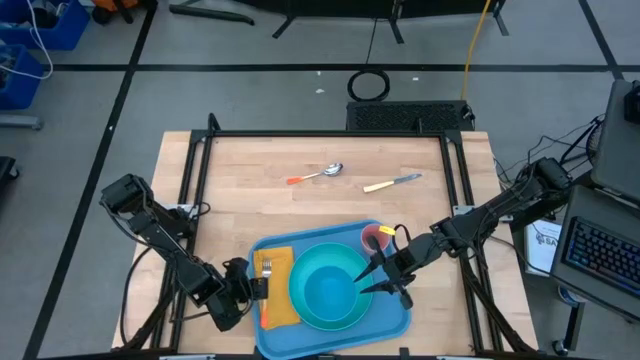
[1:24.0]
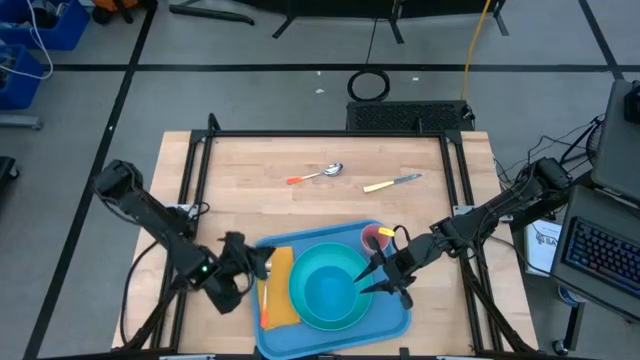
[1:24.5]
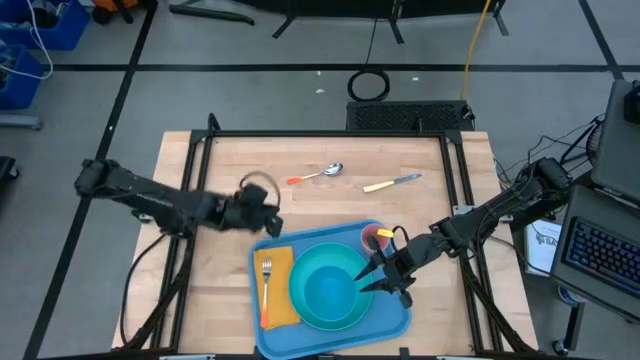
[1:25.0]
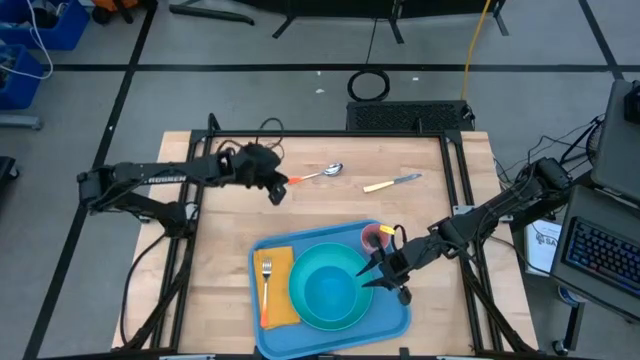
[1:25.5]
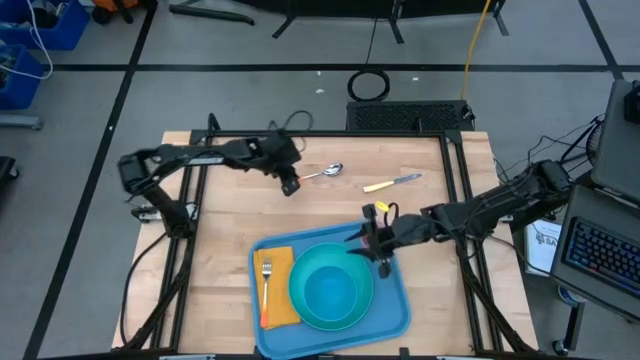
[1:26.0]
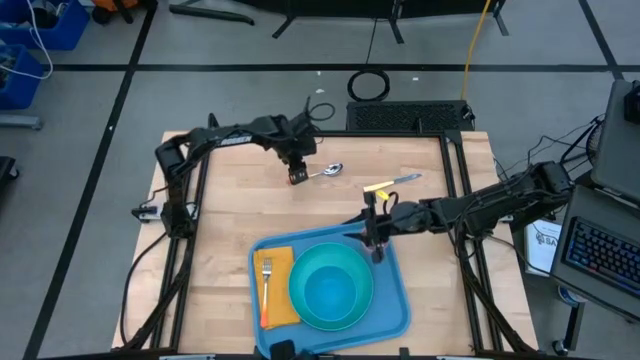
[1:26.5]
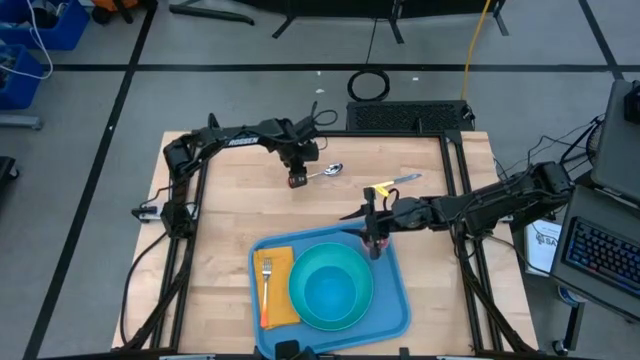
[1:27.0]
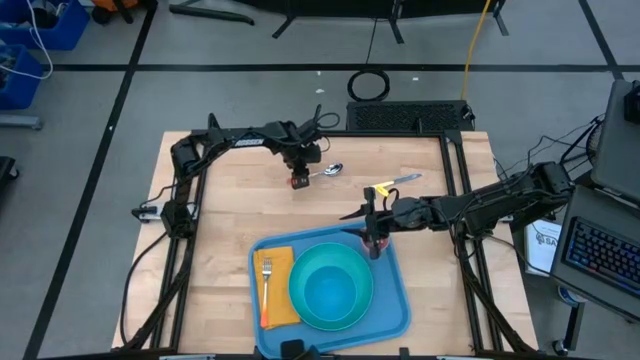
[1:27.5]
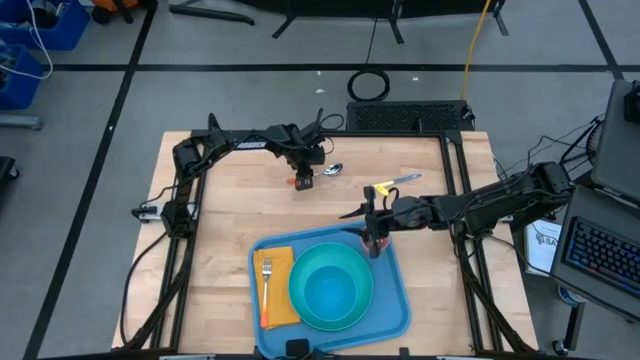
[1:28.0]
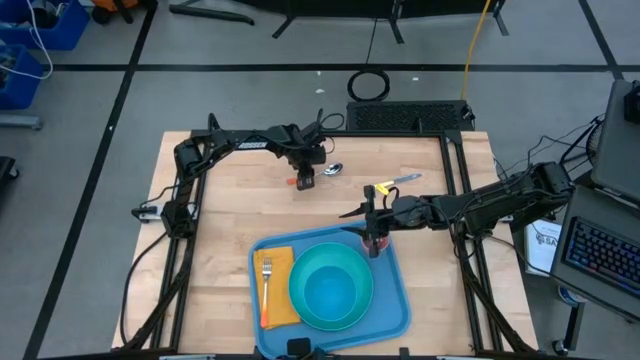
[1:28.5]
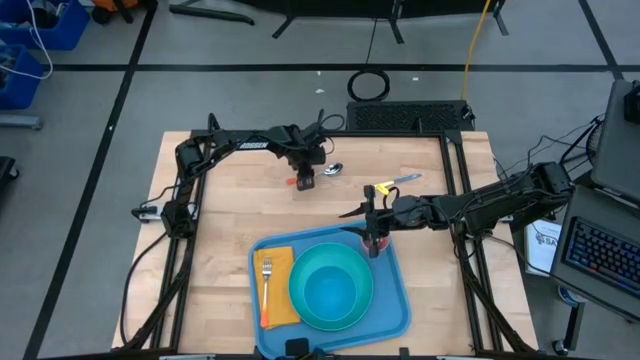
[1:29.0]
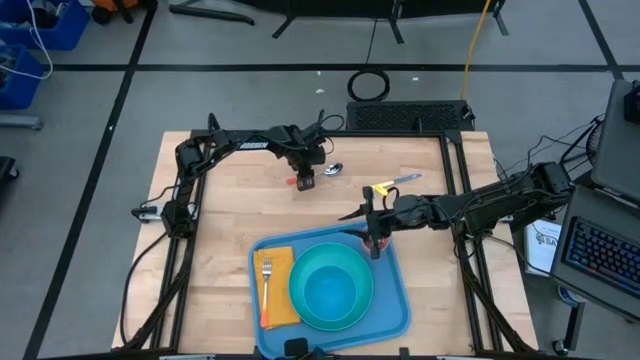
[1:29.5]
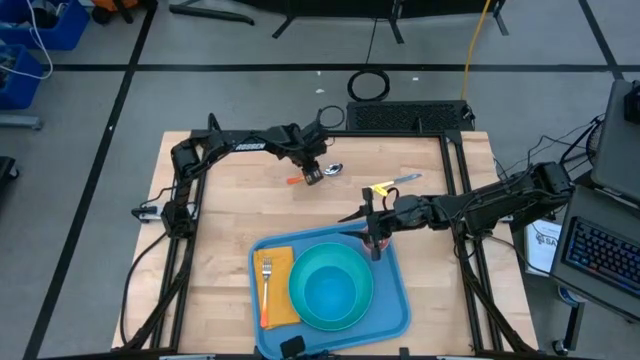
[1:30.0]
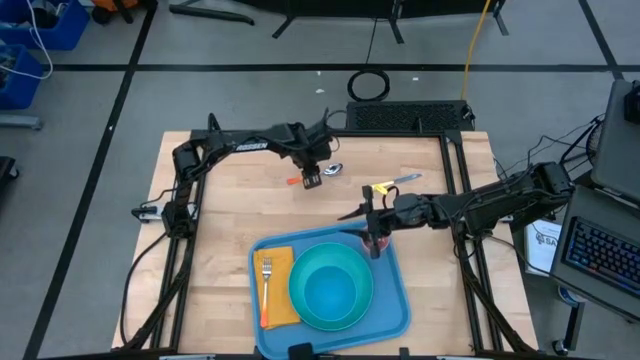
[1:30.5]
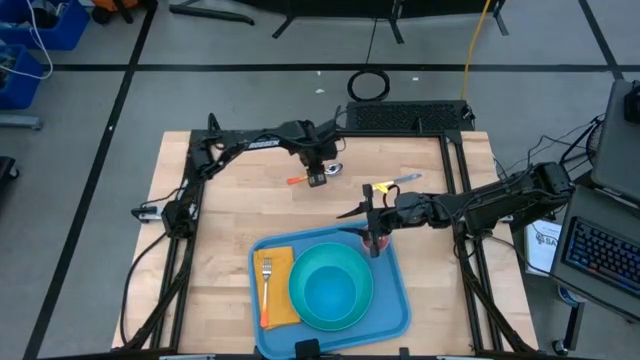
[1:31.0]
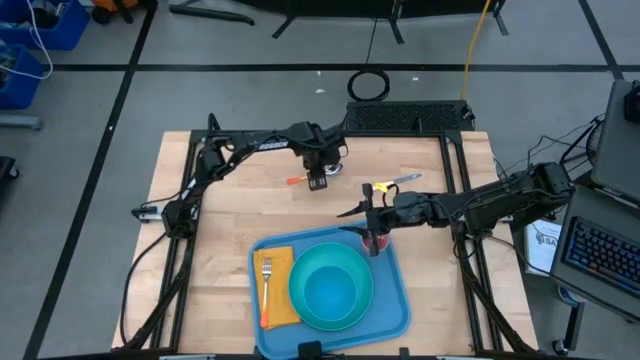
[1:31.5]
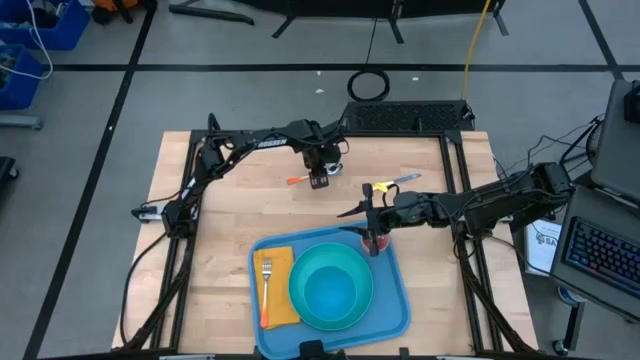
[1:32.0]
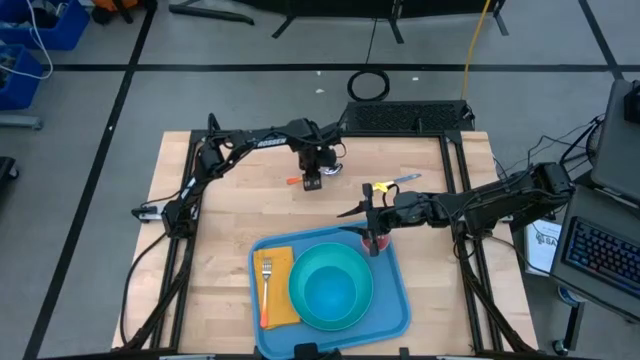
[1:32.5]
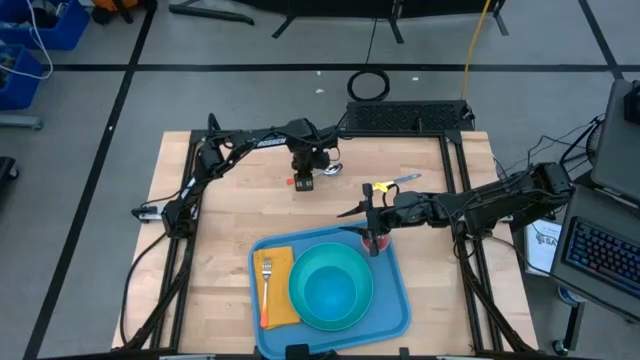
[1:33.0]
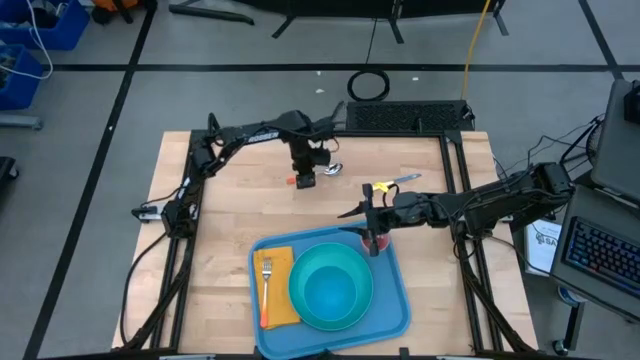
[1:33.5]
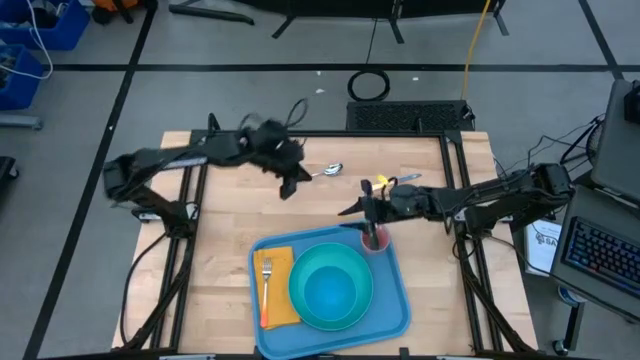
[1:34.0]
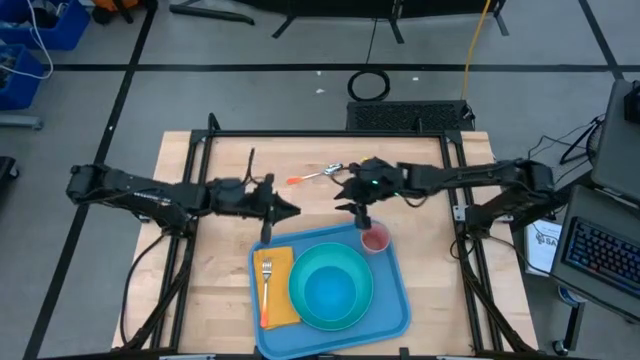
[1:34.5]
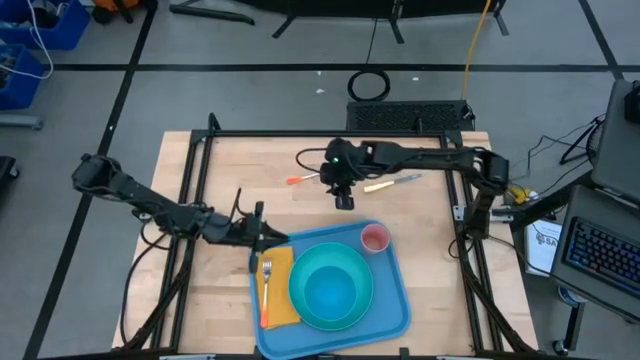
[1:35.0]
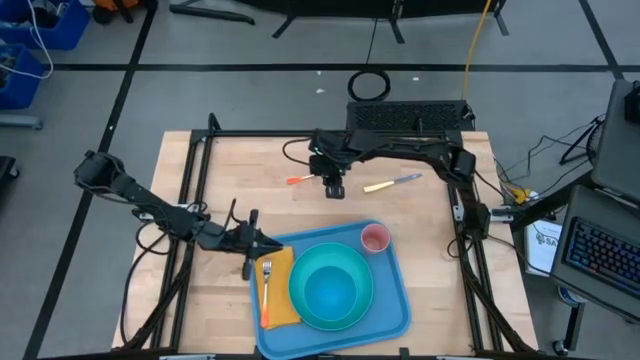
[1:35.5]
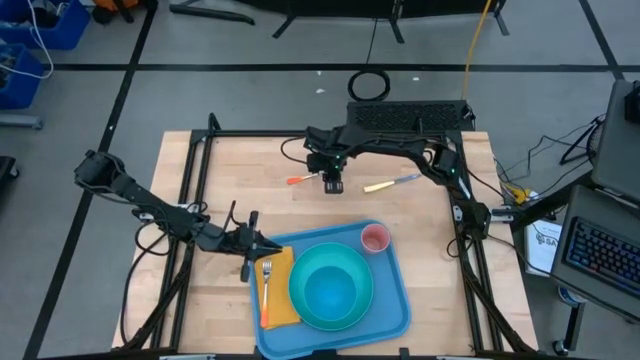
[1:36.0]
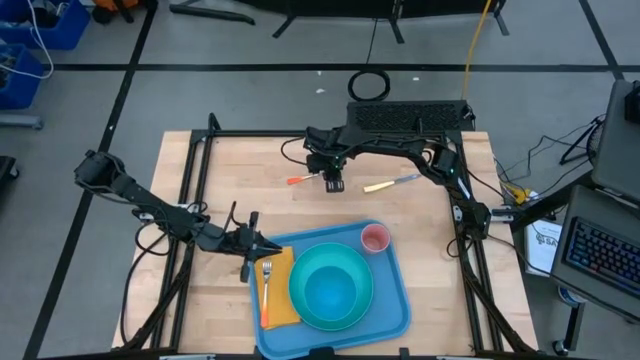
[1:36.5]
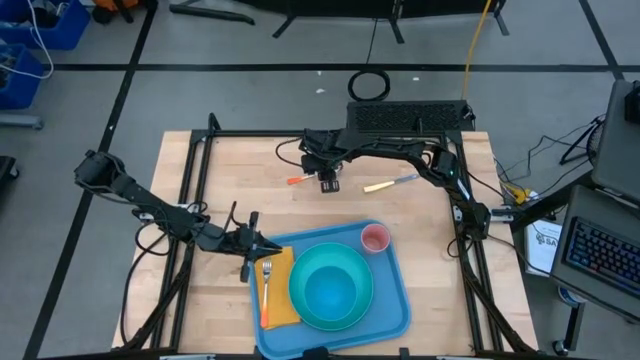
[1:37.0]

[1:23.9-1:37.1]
Task: Set up tray
Put the spoon on top of the napkin to the right of the fork

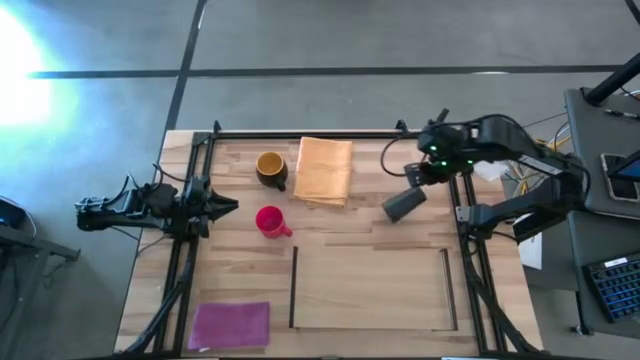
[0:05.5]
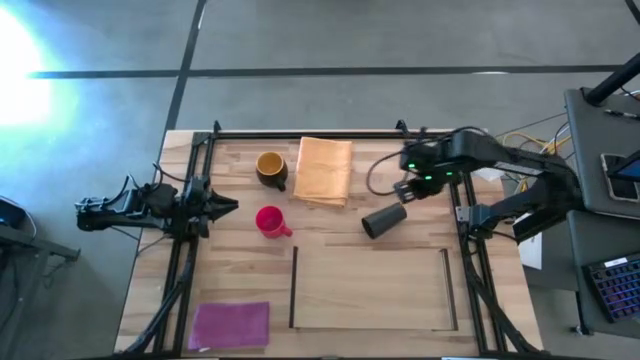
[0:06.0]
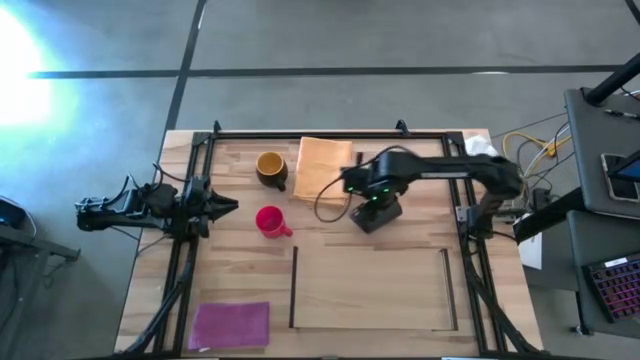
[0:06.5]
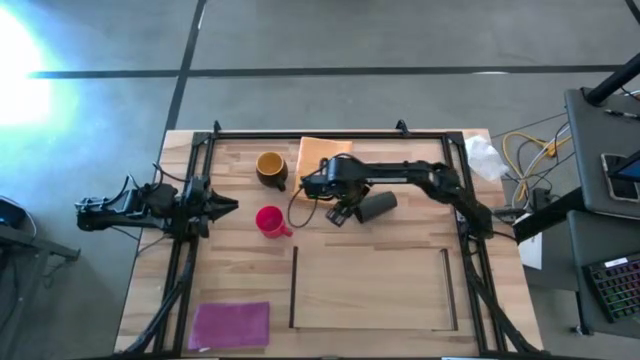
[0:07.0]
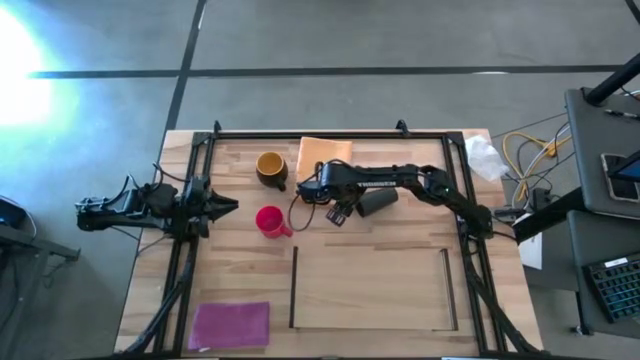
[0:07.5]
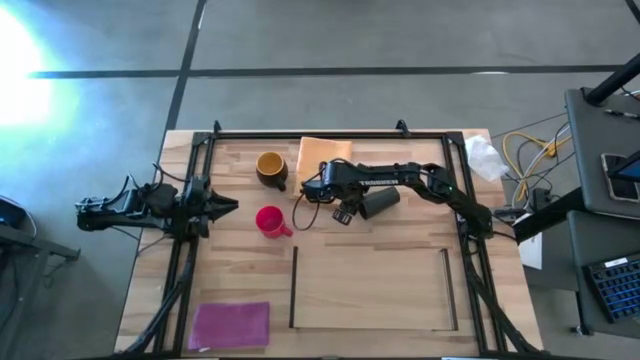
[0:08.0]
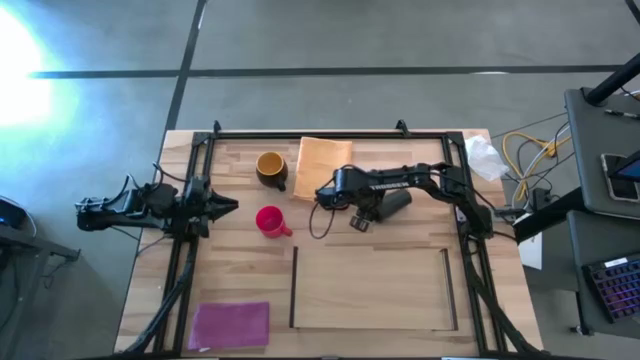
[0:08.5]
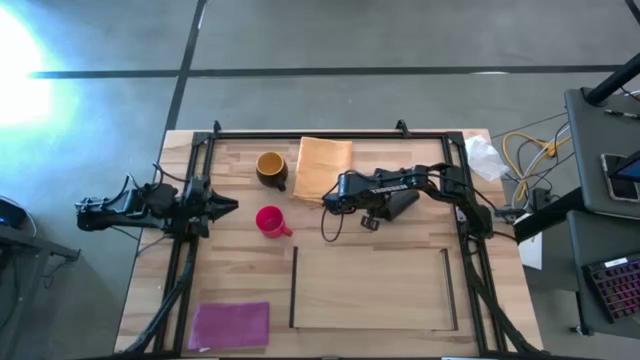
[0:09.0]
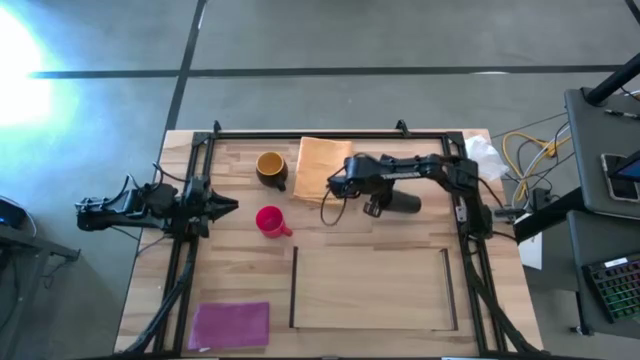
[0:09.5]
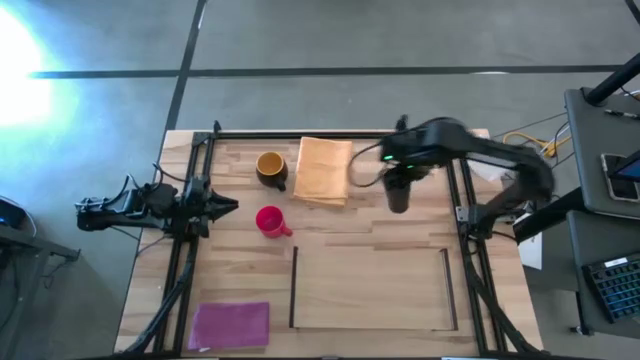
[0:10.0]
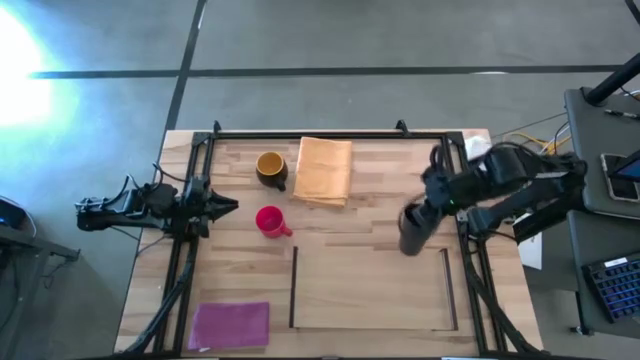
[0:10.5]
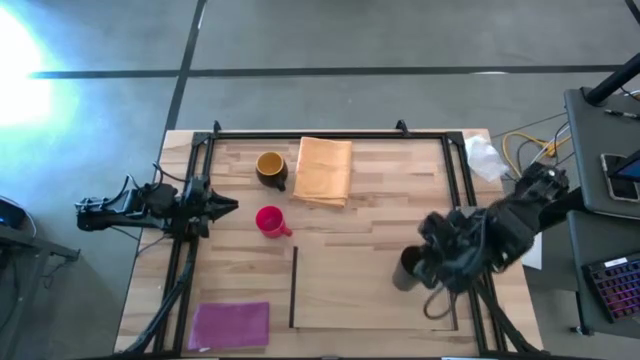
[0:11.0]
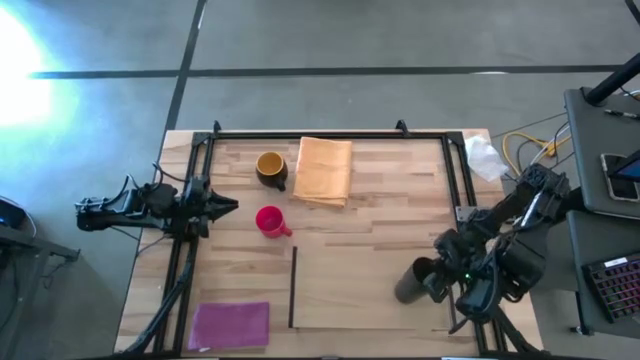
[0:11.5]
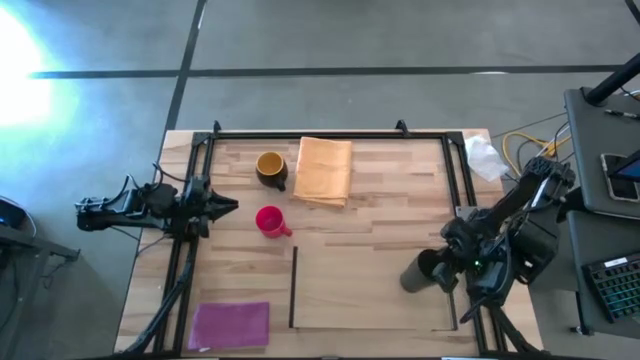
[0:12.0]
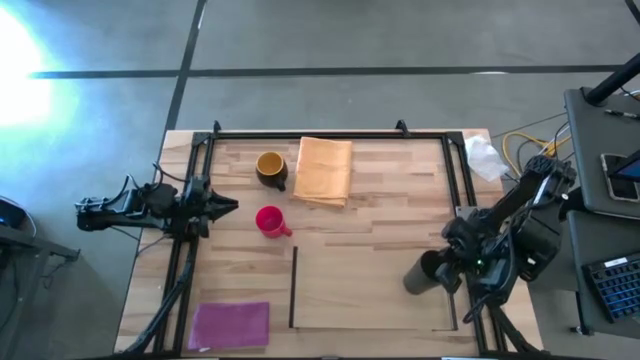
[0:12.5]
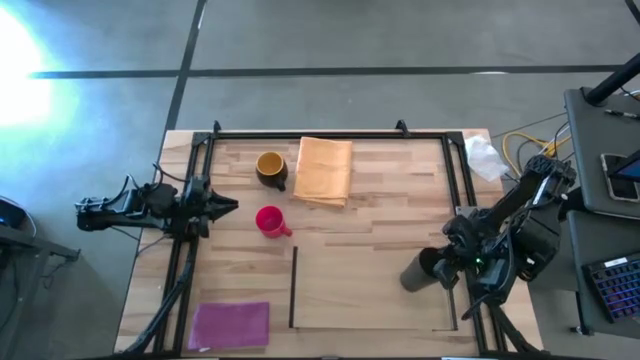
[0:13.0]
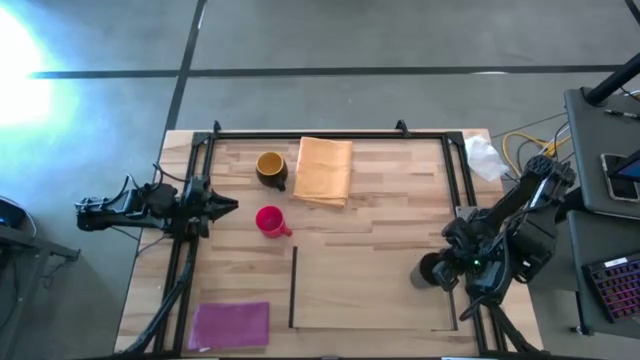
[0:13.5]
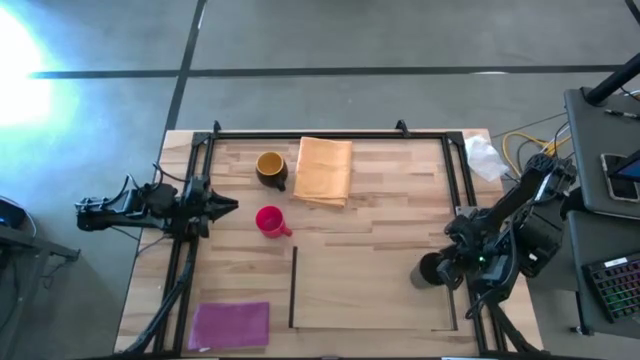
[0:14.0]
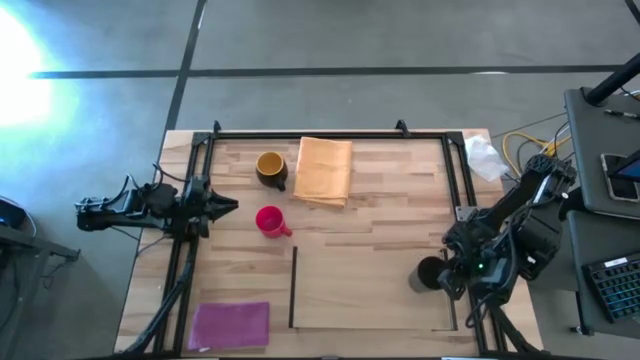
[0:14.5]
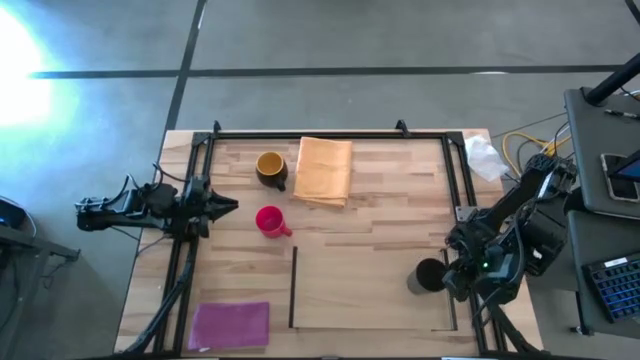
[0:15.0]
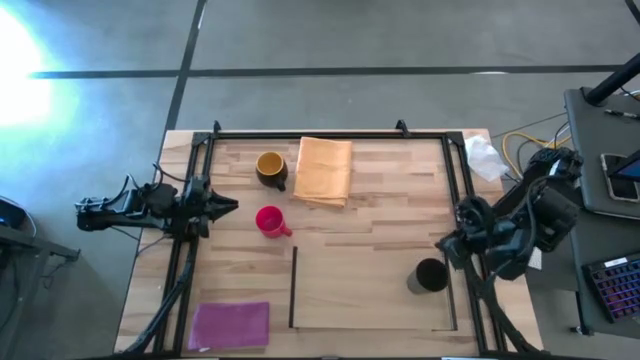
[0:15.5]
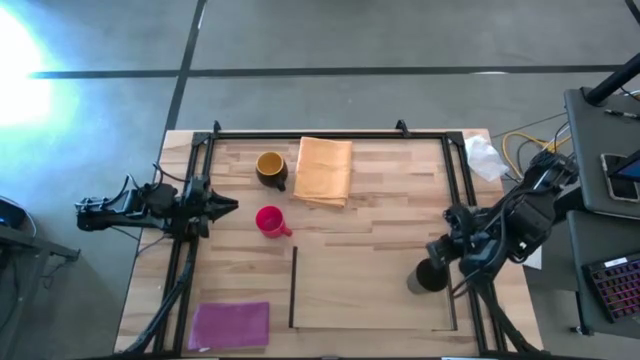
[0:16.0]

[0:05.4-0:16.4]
Task: Stack small to large cups/mugs on shelf
Put the black cup on the shelf
